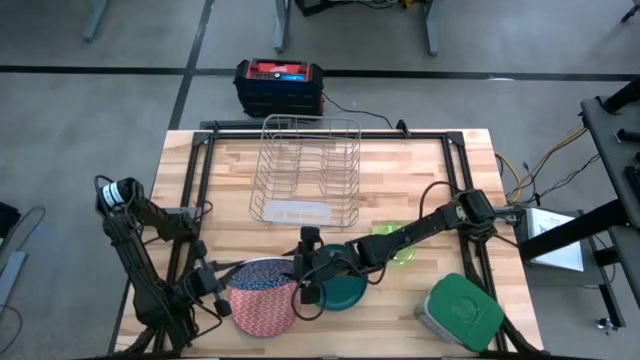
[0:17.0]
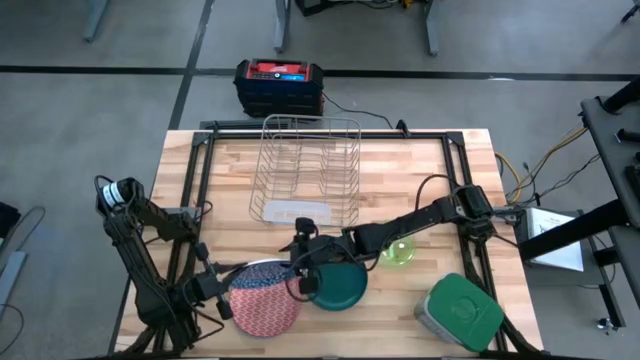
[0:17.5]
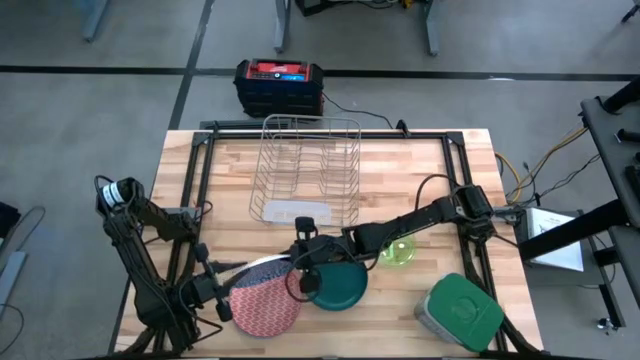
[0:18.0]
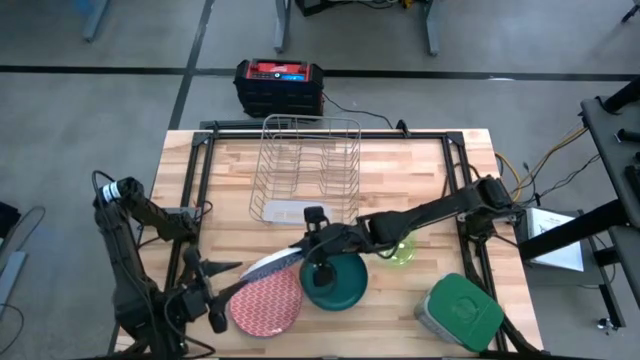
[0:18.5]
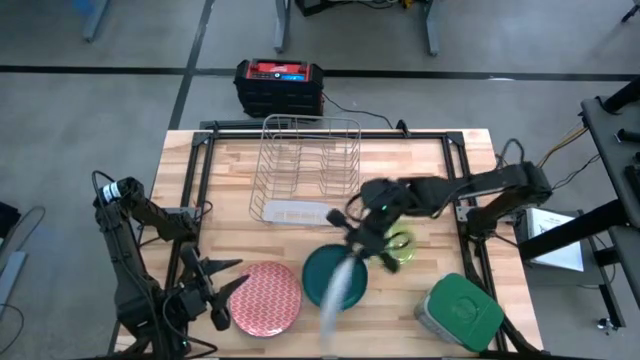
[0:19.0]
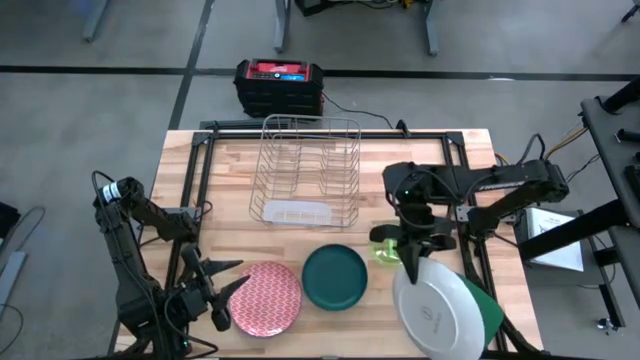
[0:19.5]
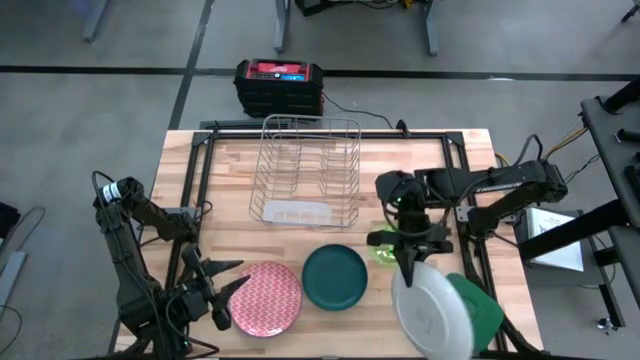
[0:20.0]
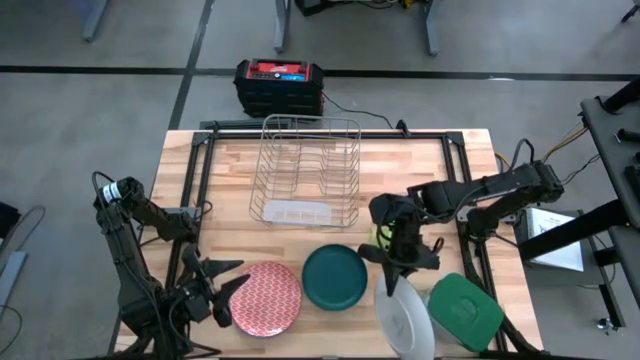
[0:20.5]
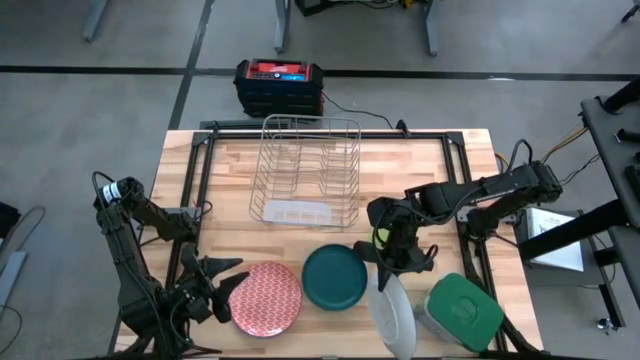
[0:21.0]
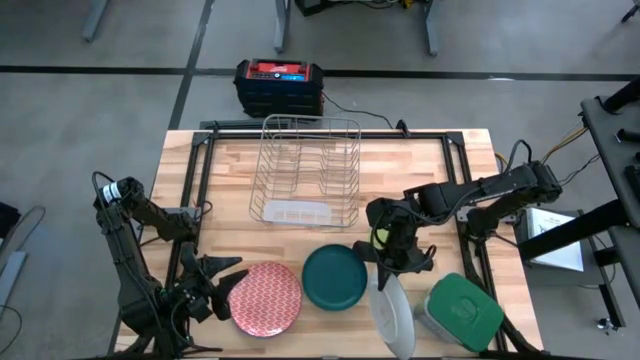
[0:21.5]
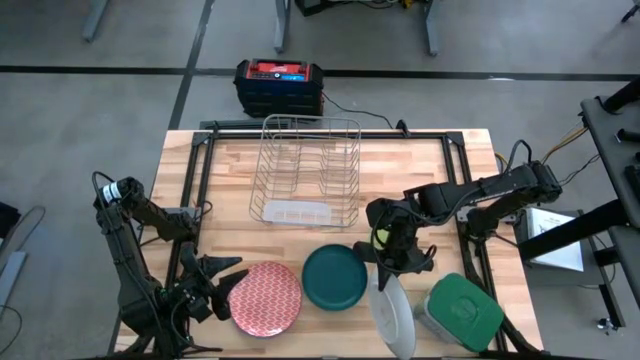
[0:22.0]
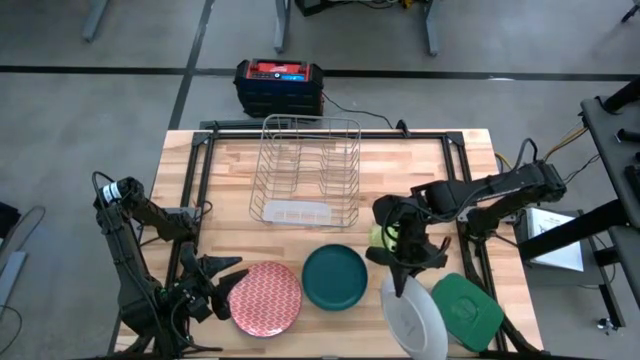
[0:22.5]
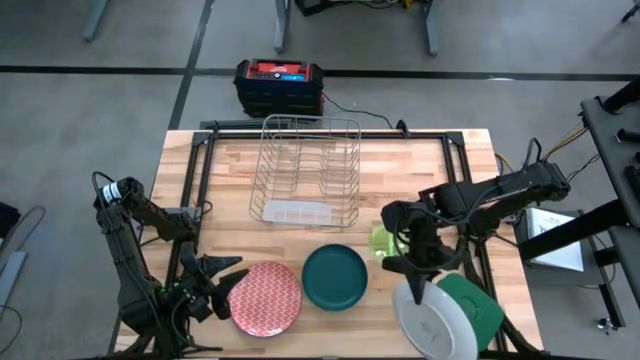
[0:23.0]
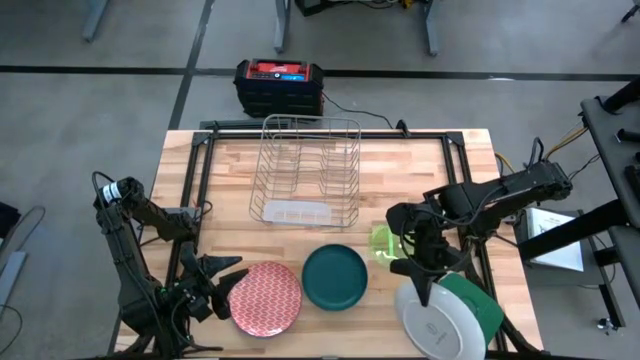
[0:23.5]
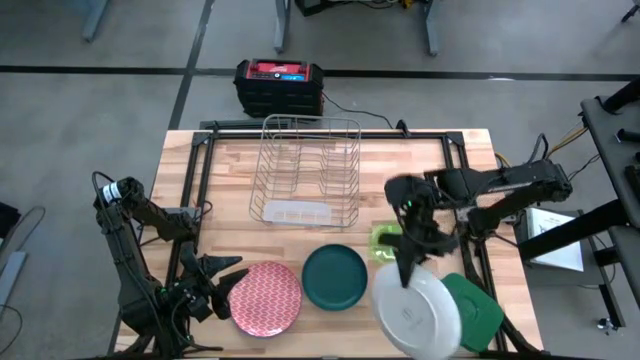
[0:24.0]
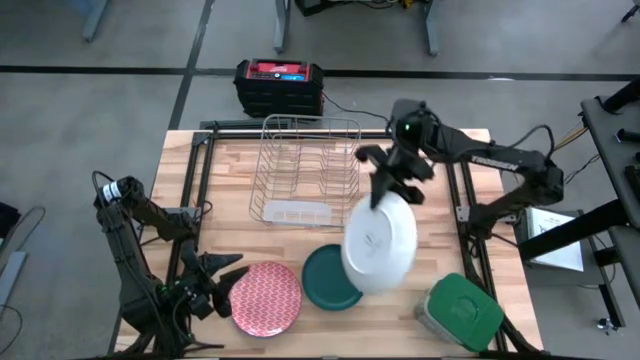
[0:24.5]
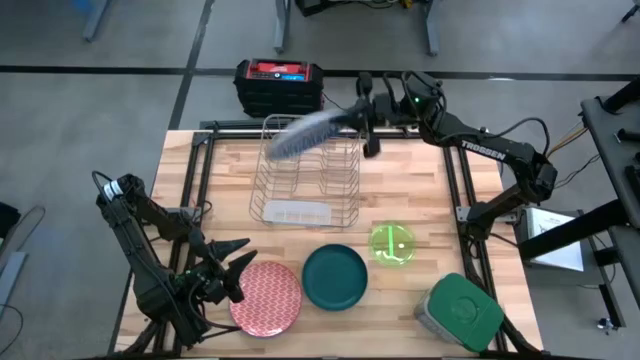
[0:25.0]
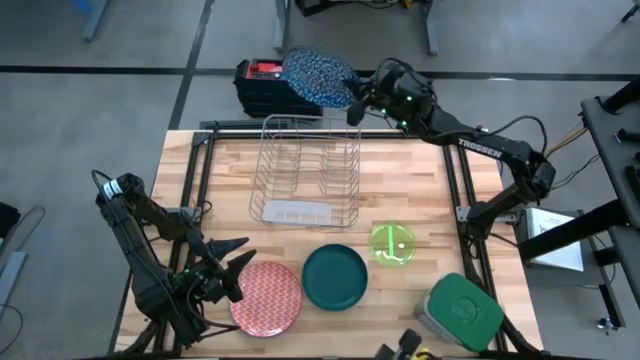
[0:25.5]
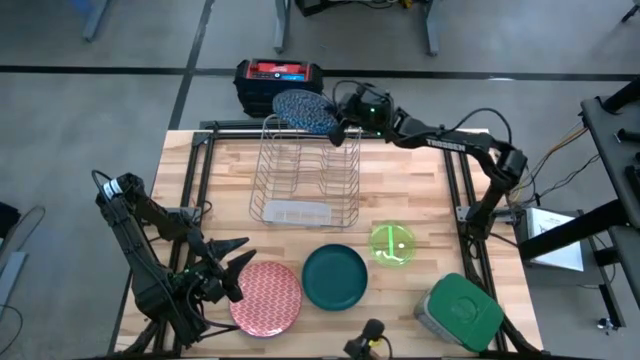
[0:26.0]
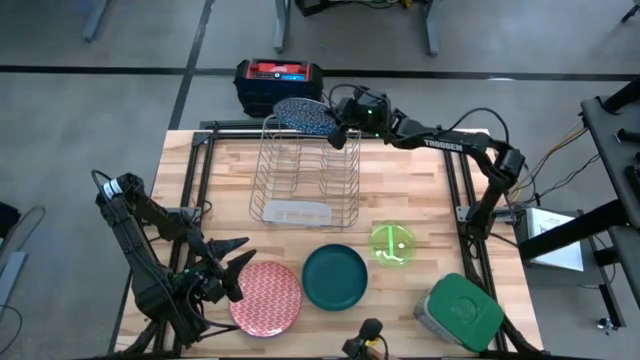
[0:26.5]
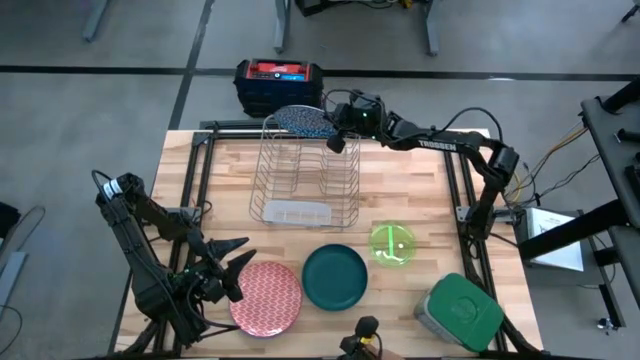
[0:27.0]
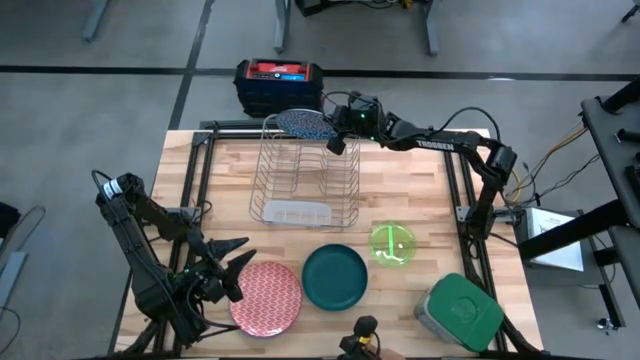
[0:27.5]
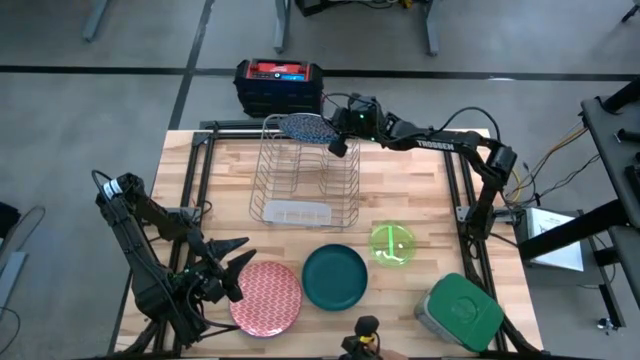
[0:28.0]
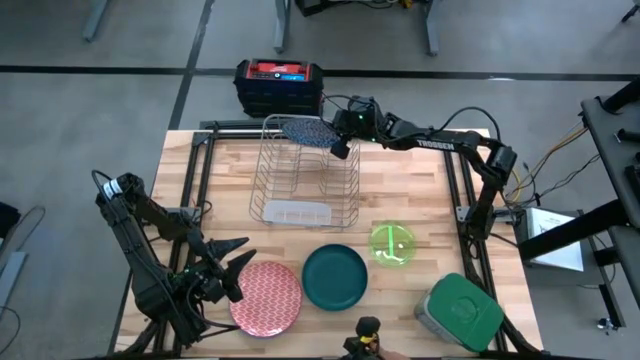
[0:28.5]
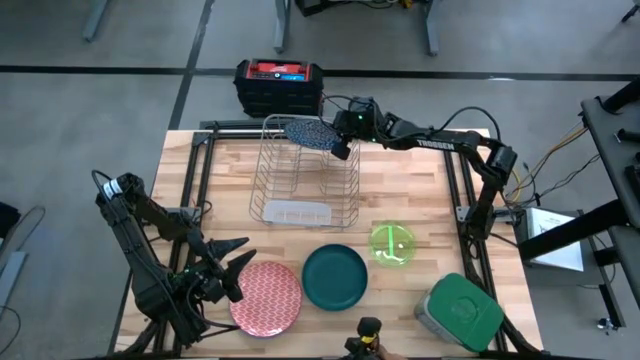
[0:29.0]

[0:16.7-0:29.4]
Task: Sort dishes
Put the blue patterned plate into the dish rack

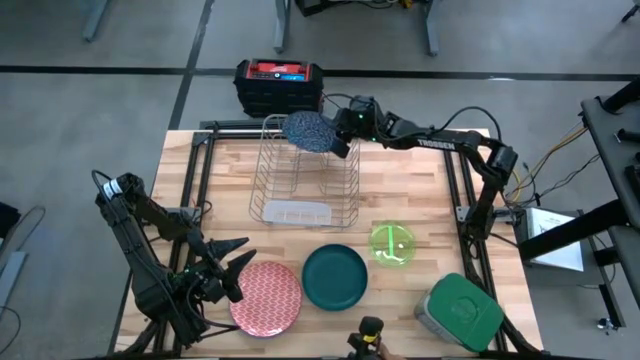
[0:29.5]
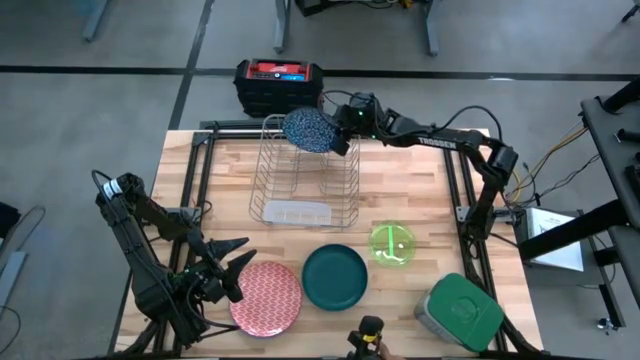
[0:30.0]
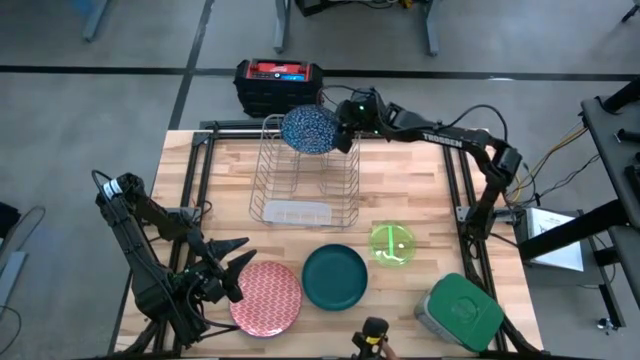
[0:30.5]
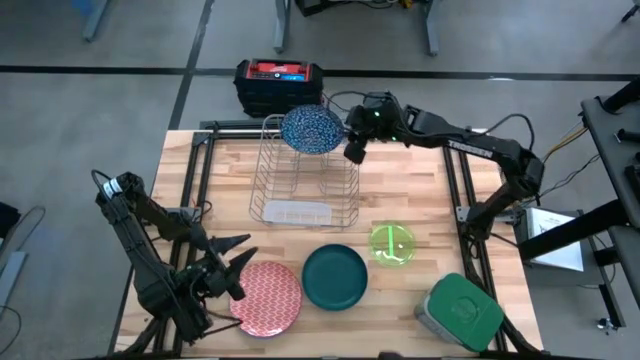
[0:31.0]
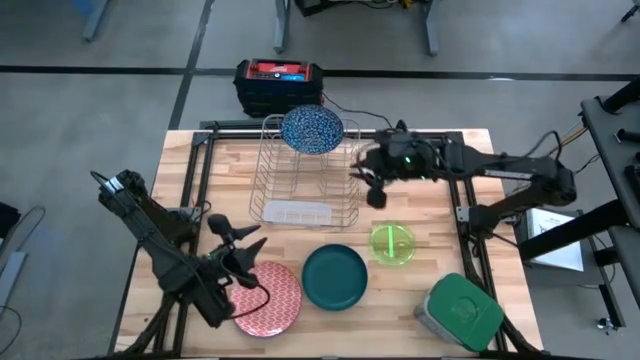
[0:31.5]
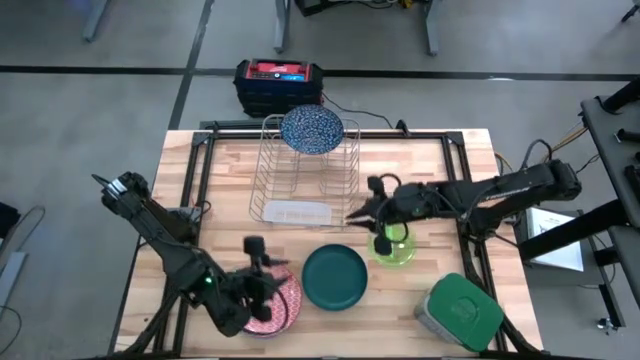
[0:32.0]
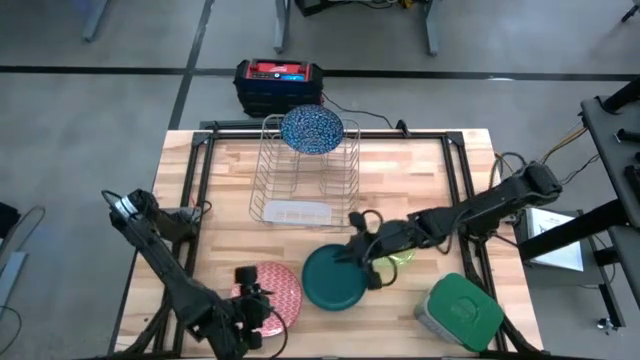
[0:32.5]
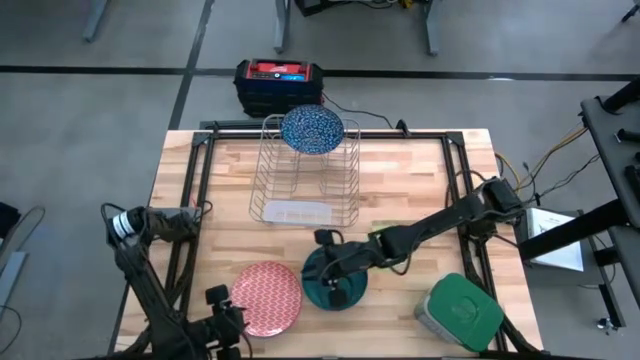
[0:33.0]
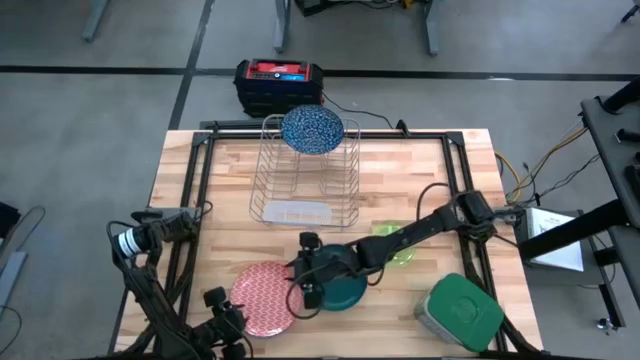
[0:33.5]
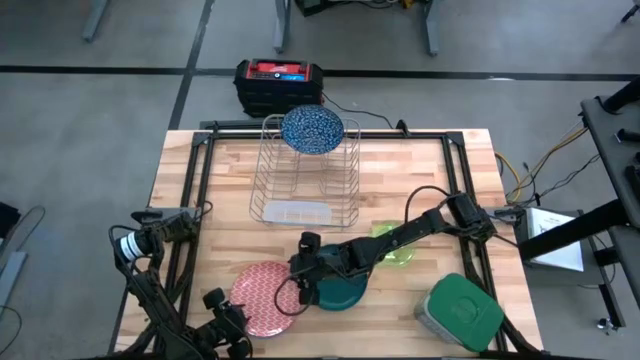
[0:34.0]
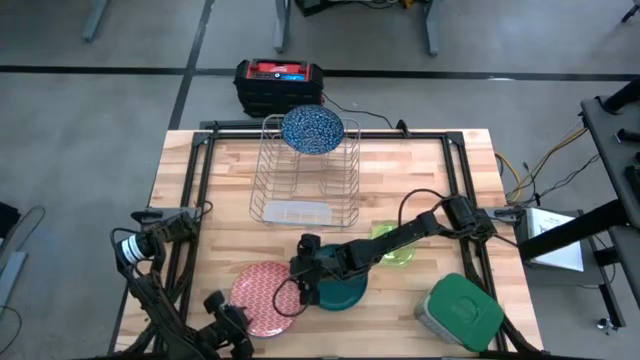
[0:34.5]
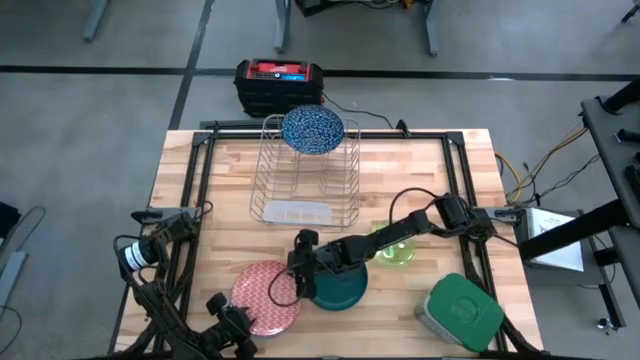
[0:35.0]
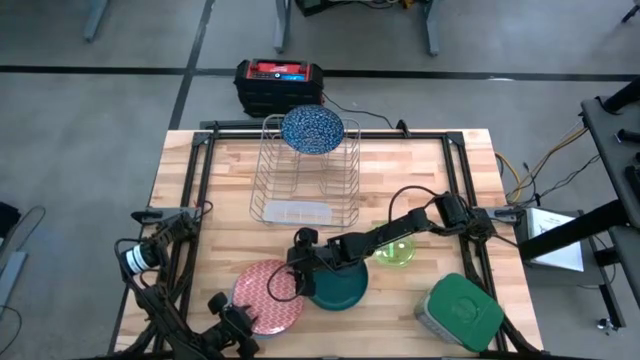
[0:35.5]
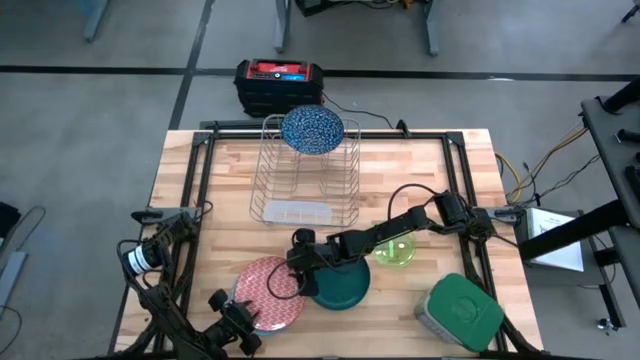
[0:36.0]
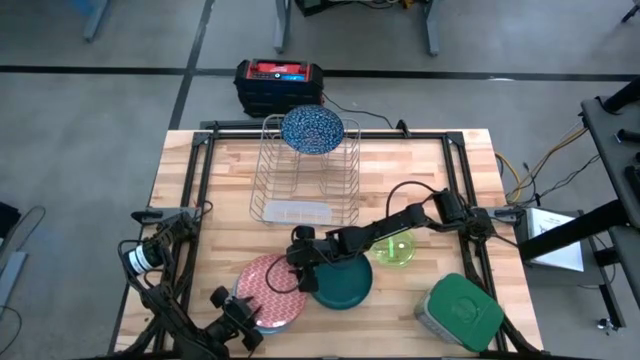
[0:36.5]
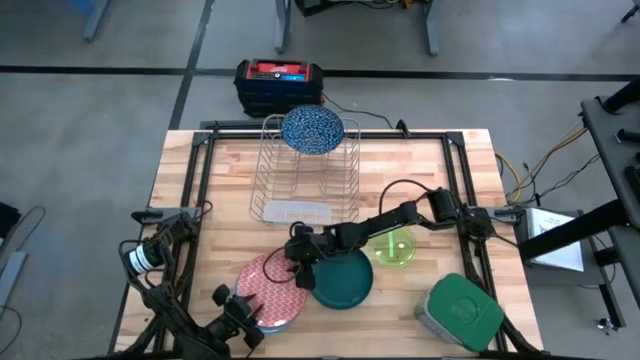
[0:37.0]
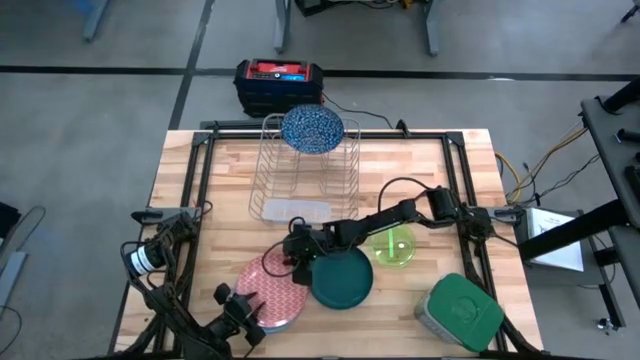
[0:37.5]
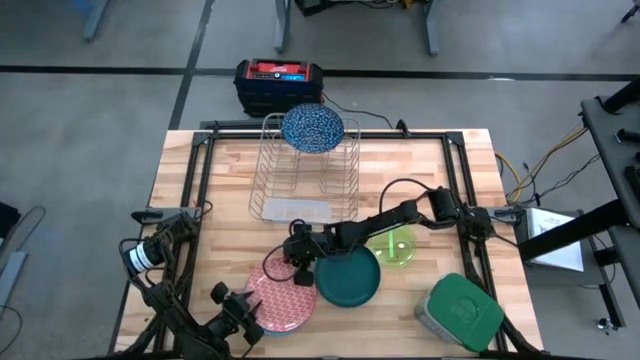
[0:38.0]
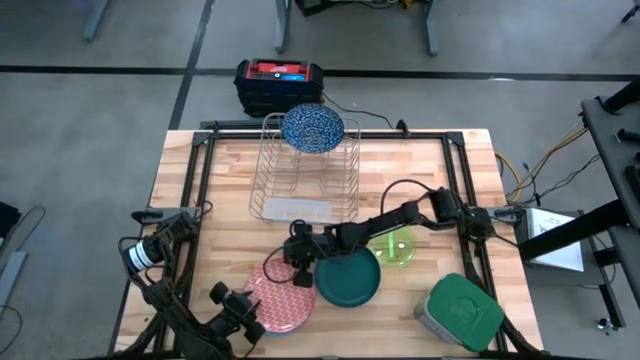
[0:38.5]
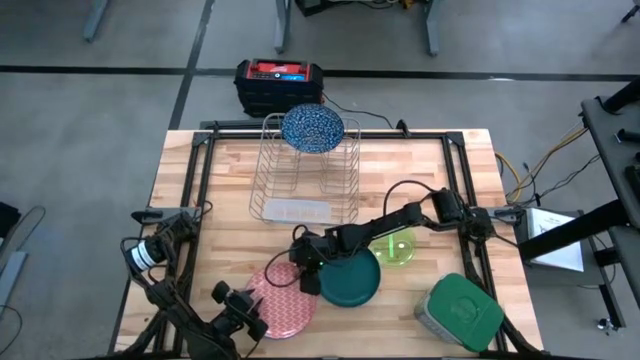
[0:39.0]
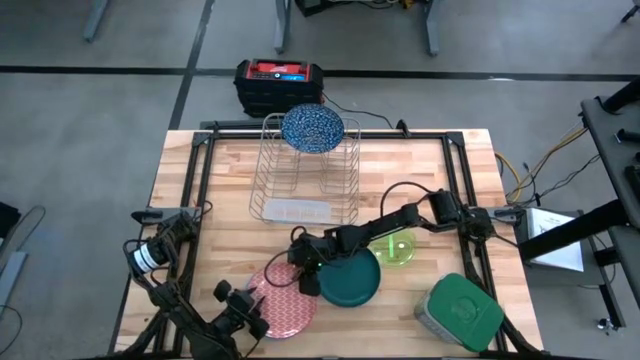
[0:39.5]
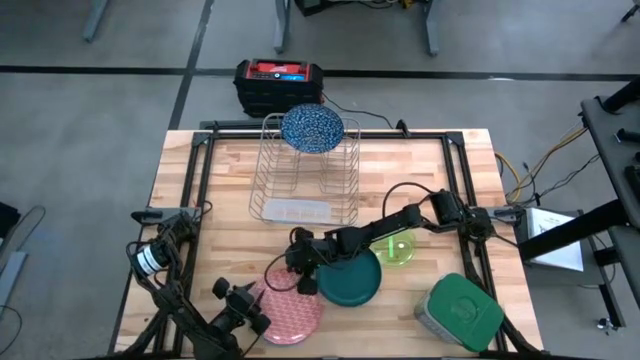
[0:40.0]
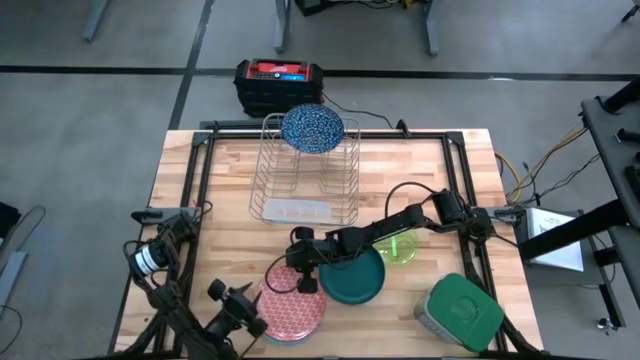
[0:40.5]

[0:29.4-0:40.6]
Put the orange patterned plate into the dish rack
